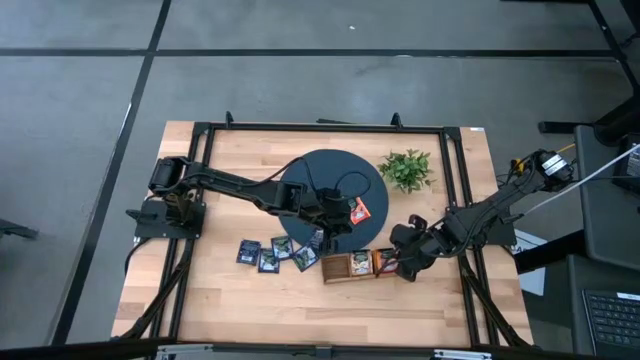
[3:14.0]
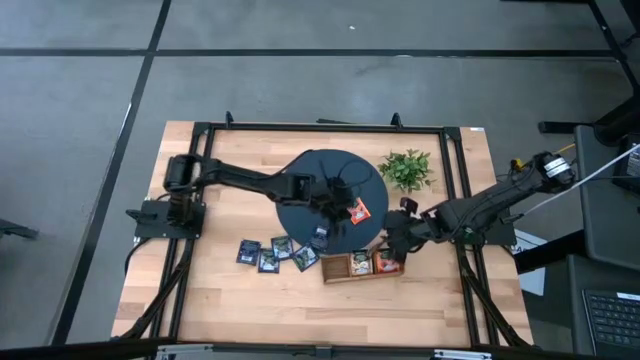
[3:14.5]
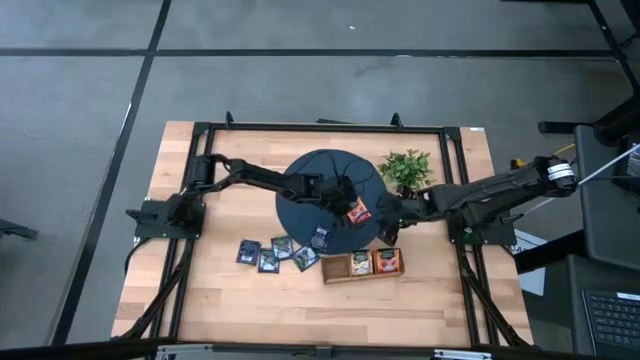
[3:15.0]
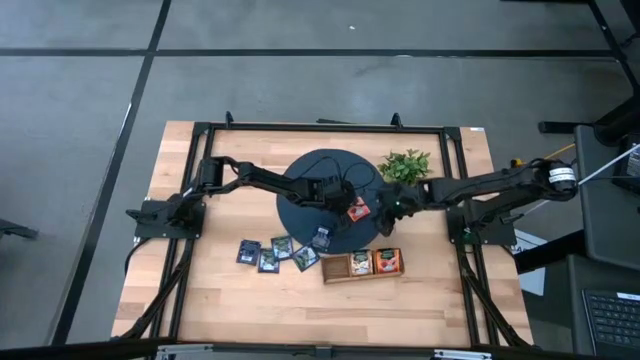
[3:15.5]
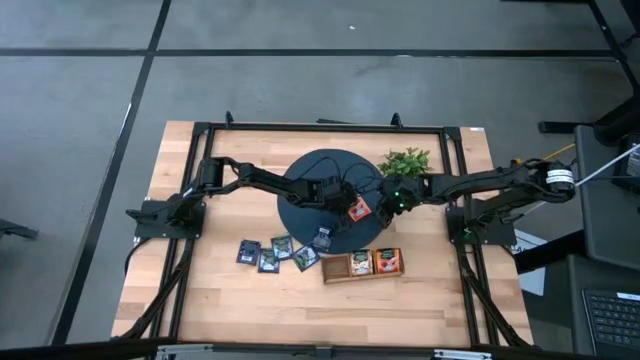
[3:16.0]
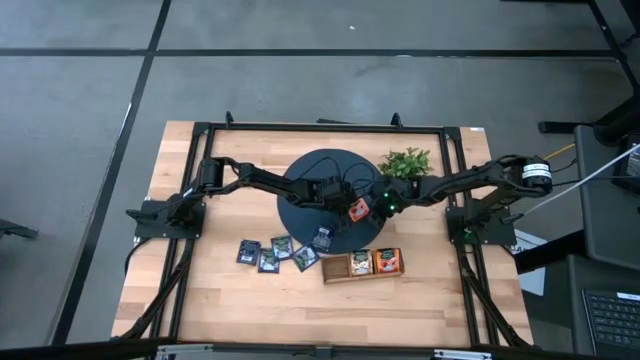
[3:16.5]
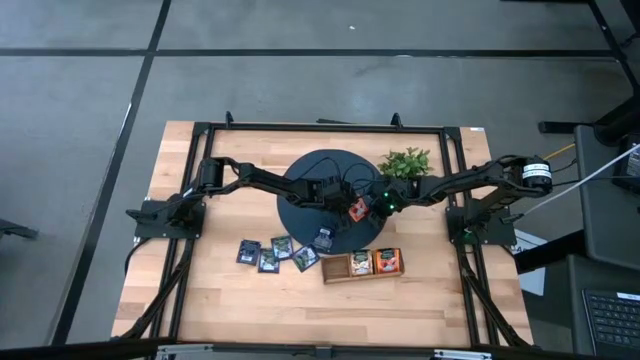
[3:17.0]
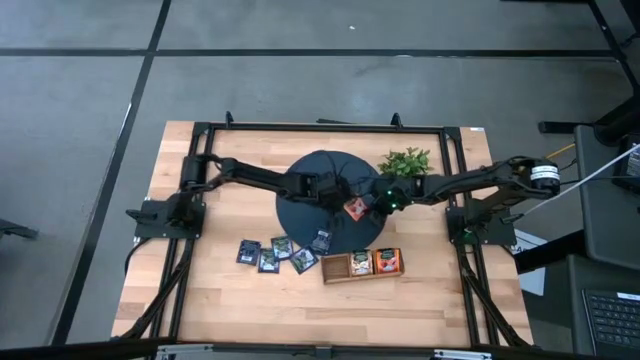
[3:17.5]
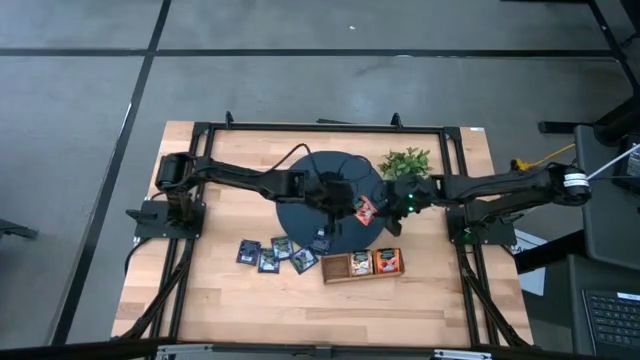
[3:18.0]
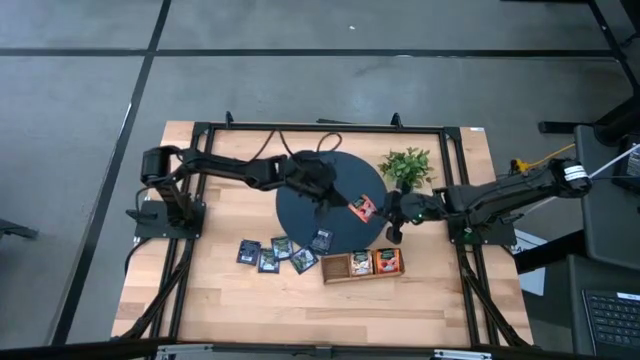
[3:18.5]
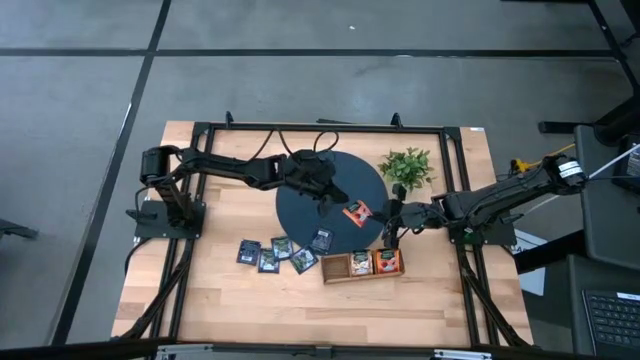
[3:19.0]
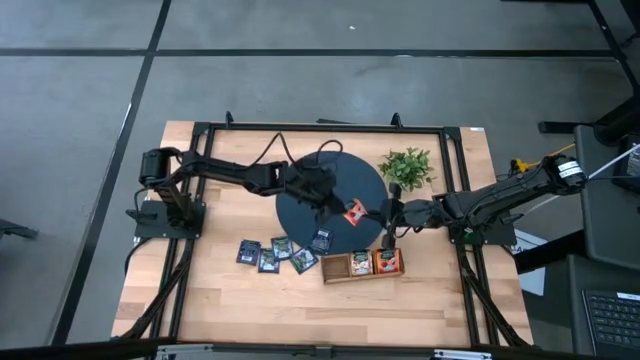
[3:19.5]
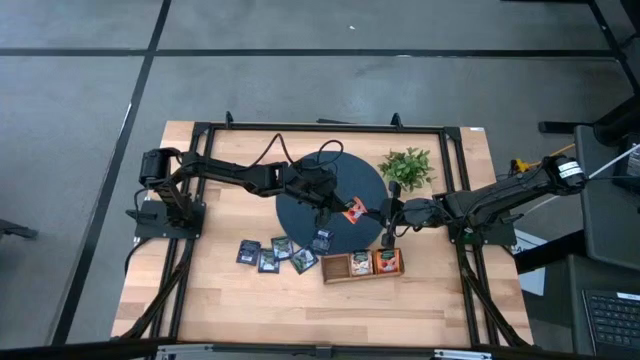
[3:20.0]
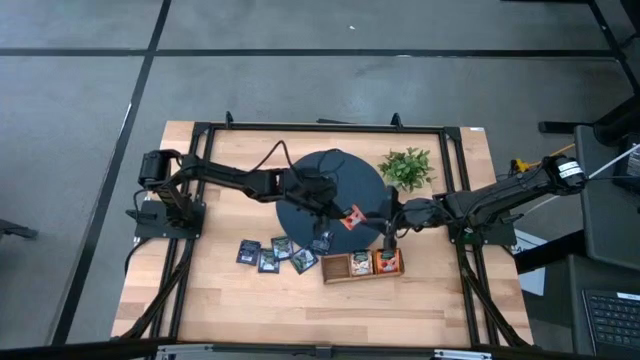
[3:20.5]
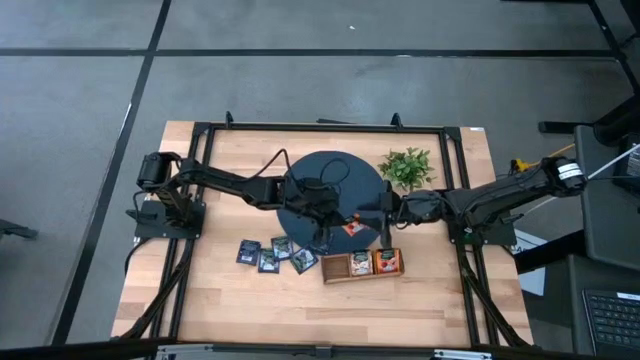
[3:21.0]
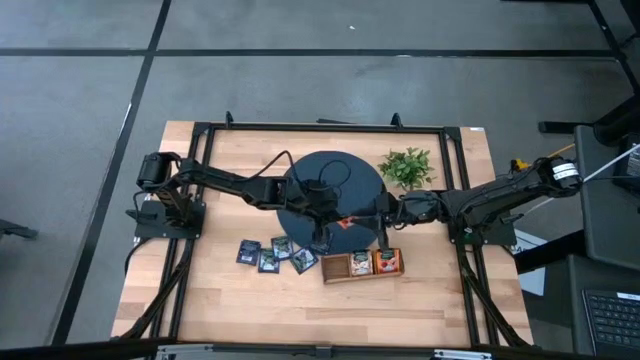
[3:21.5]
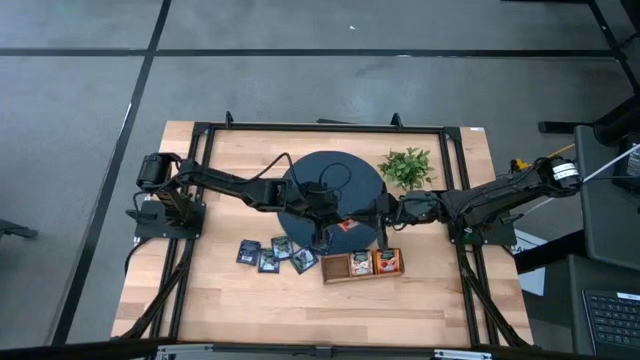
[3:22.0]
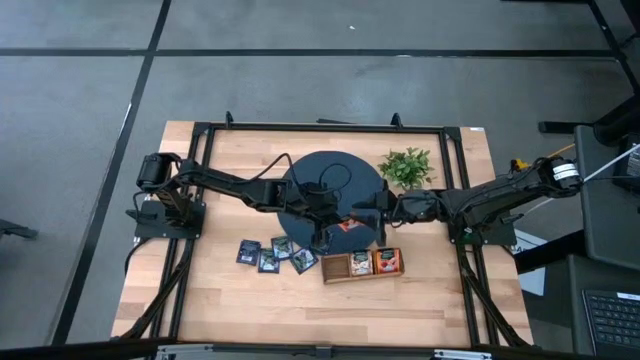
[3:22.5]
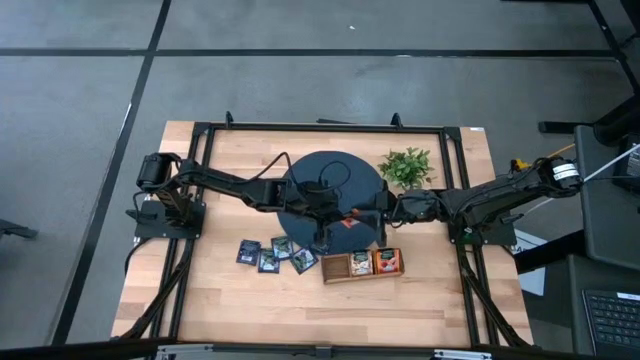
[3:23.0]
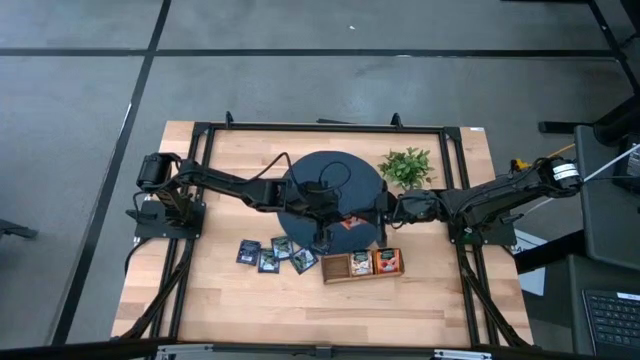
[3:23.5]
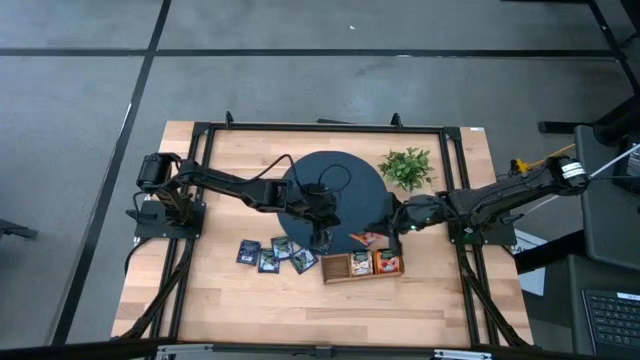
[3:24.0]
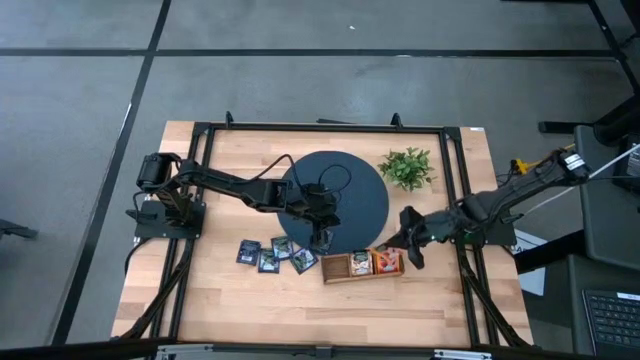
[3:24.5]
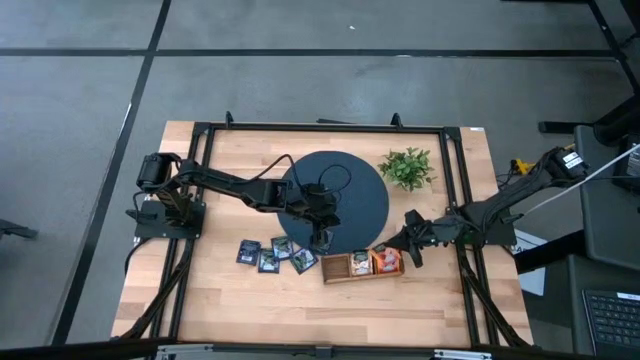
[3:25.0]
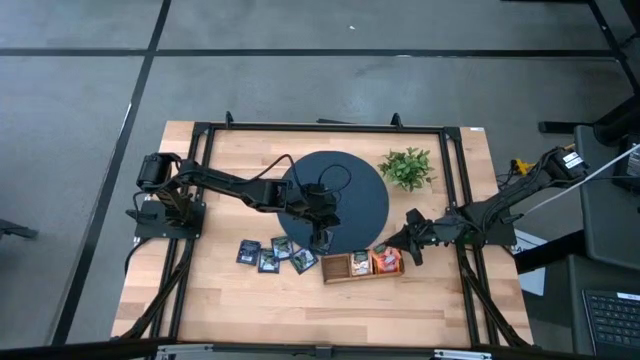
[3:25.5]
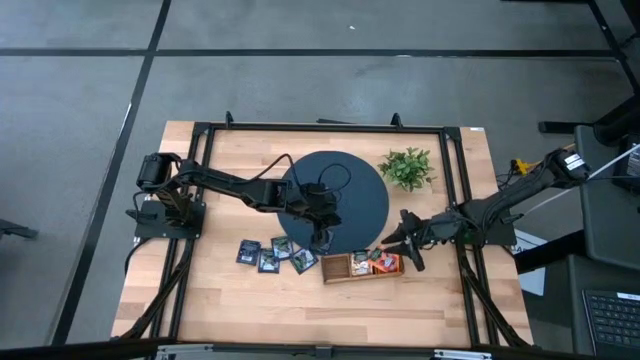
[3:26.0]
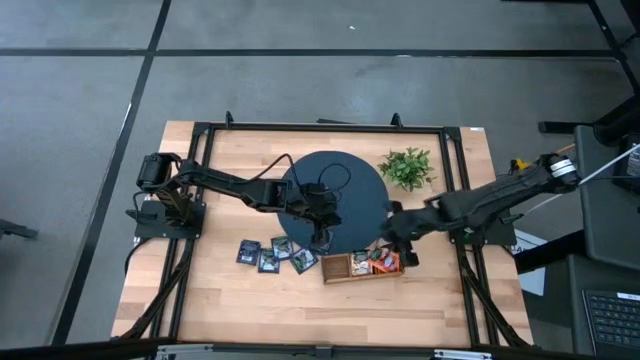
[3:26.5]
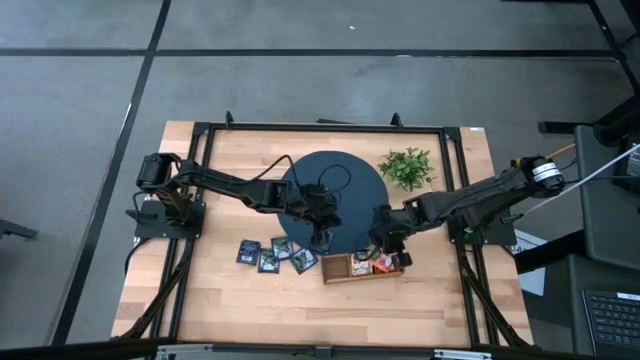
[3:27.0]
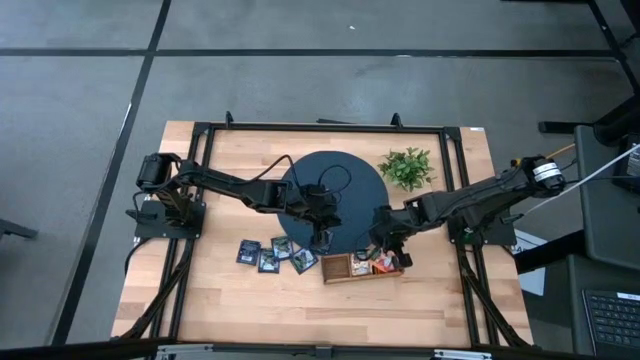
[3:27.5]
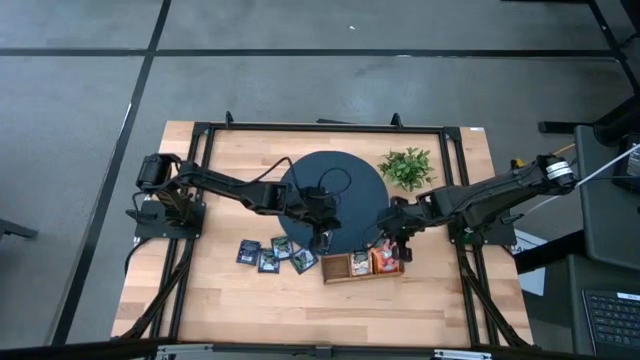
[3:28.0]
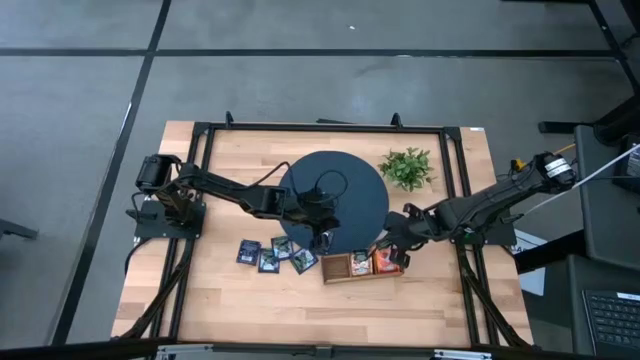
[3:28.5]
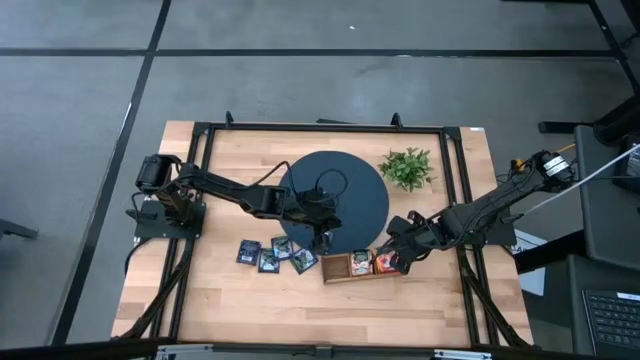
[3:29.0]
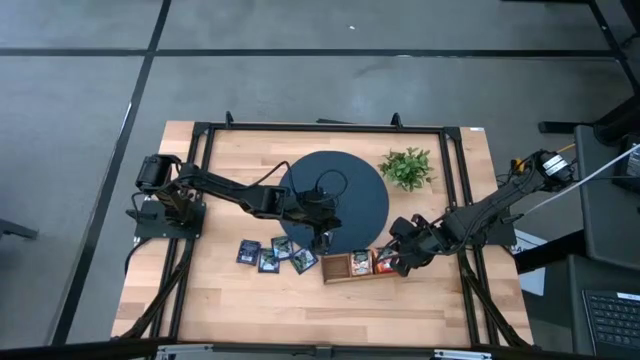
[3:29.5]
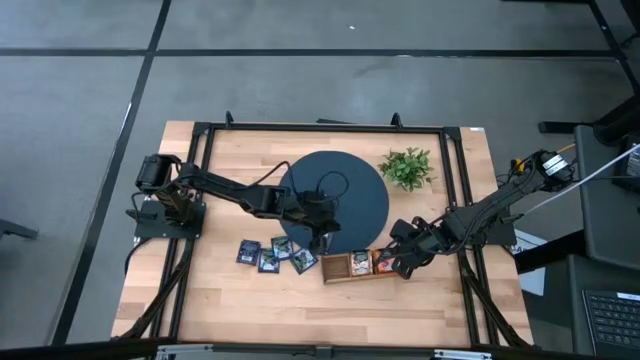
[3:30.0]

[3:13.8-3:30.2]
Task: Pick & Place Tea
Put the orange tea bag into the right section of the wooden organizer

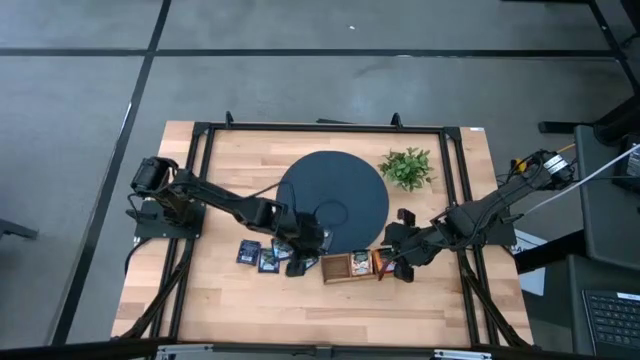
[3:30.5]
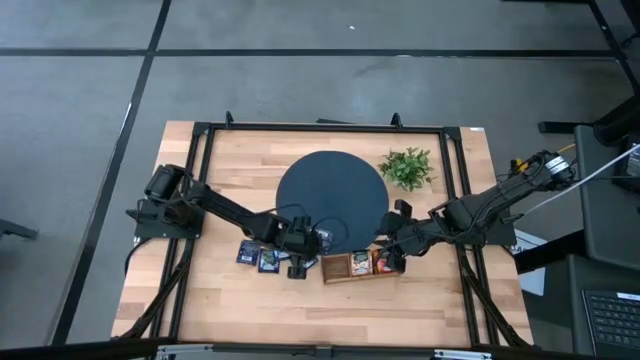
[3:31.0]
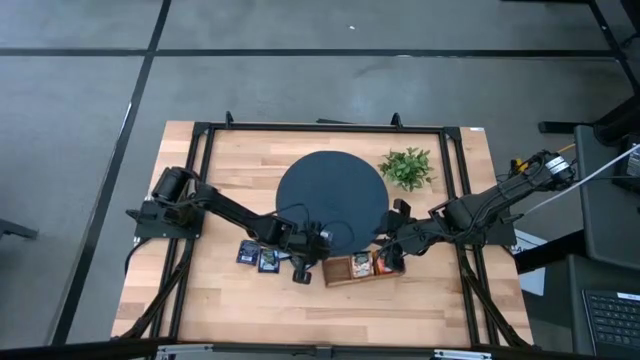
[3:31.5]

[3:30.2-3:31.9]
Adjust the wooden organizer
